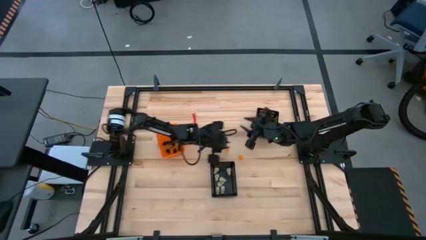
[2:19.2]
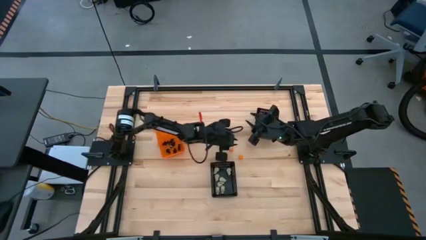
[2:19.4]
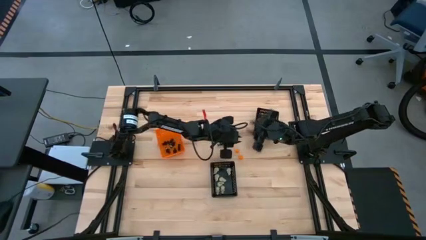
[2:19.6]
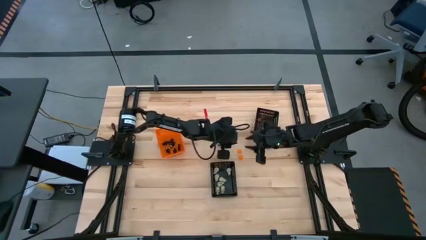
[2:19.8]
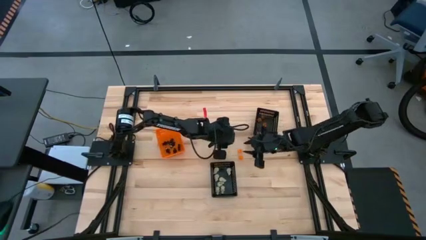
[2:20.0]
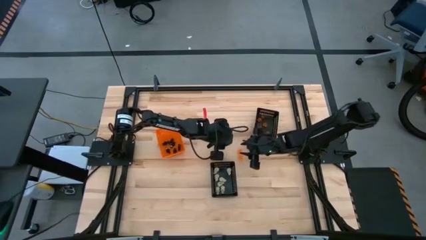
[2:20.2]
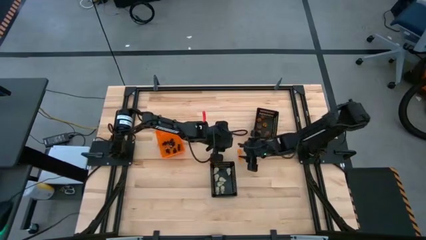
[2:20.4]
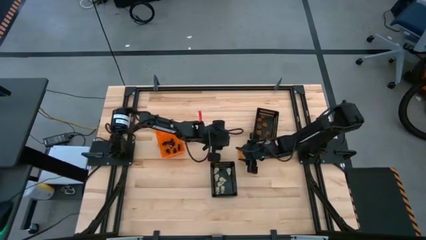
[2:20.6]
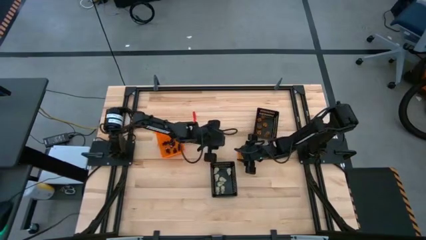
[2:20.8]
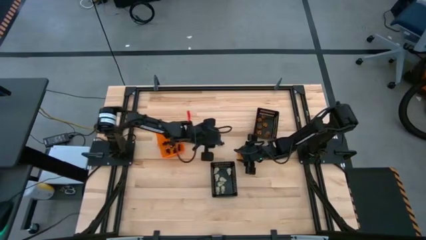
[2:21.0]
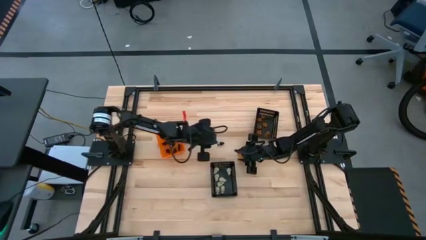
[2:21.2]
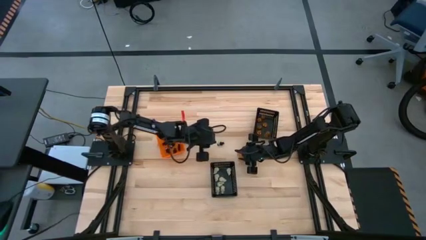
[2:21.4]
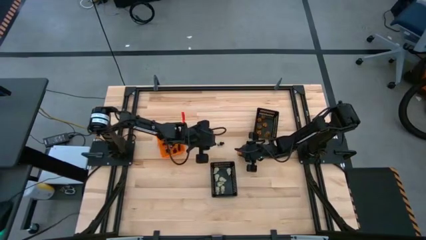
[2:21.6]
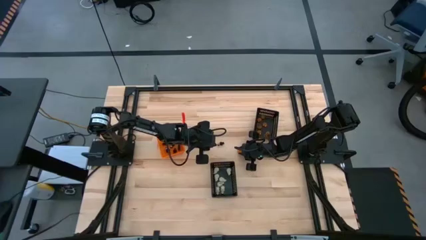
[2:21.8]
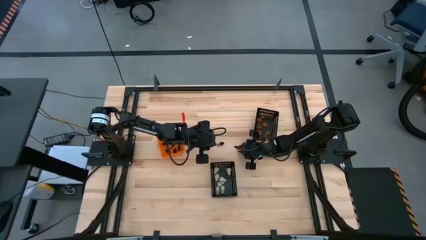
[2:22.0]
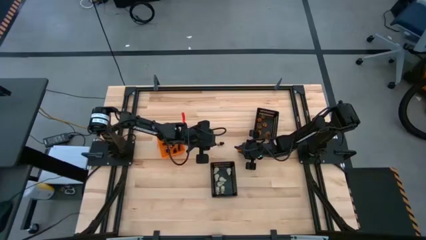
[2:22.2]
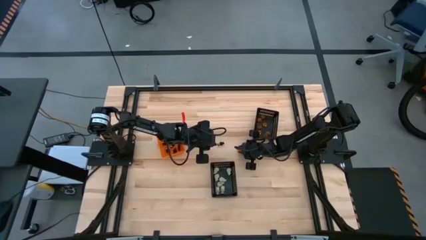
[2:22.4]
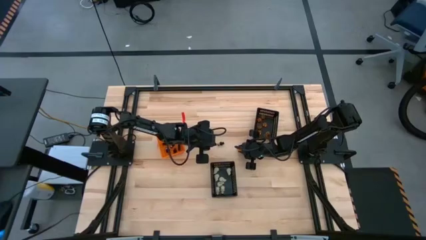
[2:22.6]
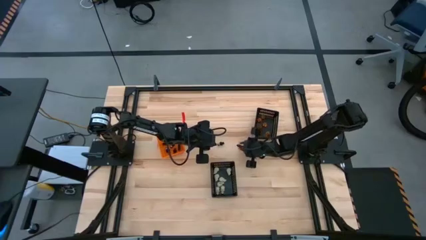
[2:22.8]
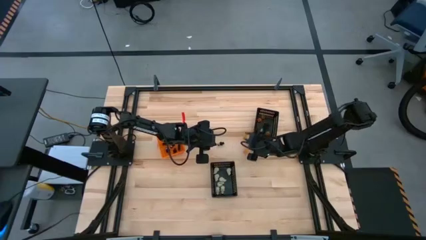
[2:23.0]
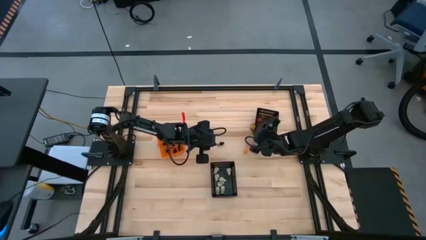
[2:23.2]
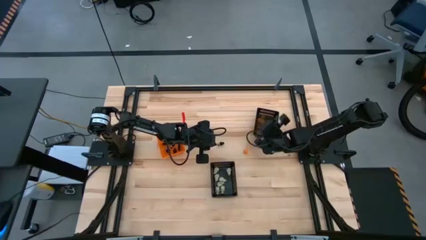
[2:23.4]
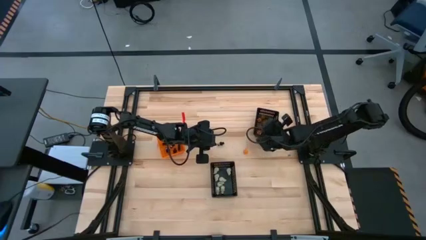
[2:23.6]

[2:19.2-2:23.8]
Task: Sort Halloween decoration
Put the orange pumpkin toy into the top black bin

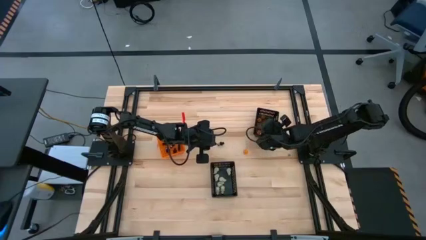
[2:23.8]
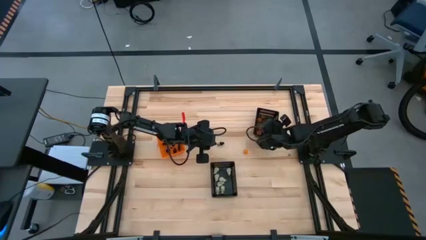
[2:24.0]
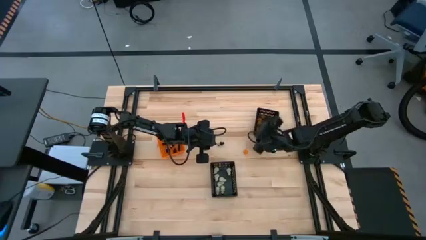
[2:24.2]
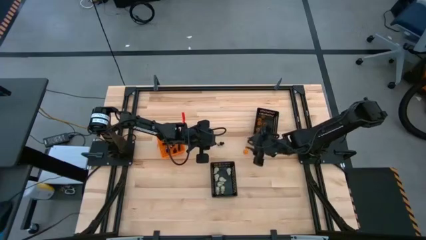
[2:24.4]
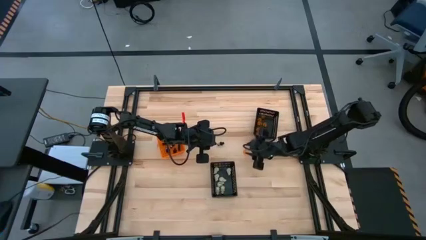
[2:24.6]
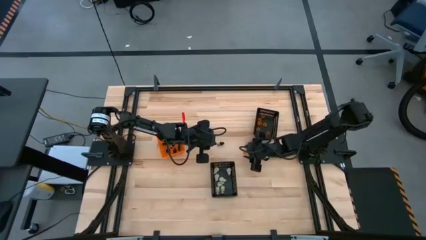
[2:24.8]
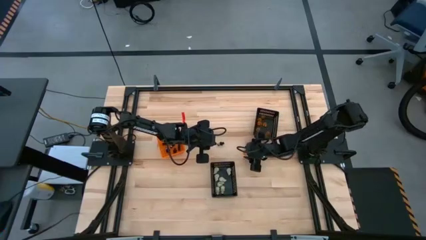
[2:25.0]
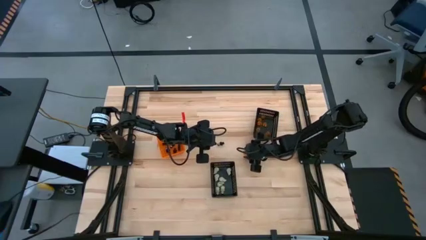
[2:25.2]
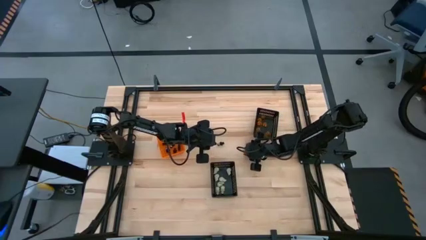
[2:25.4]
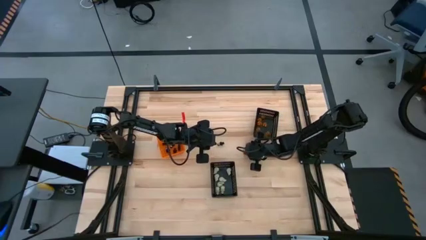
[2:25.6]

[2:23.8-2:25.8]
Put the orange pumpkin toy into the top black bin

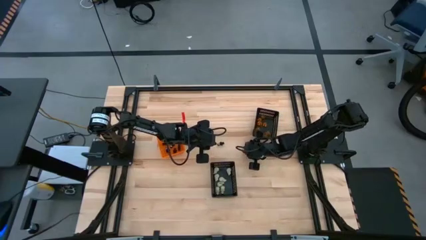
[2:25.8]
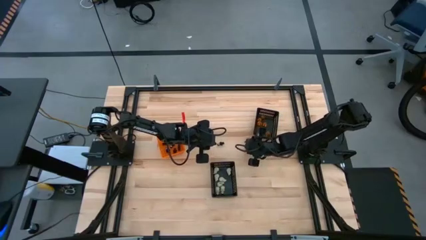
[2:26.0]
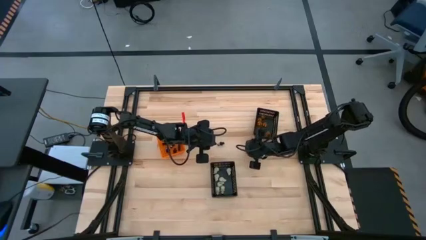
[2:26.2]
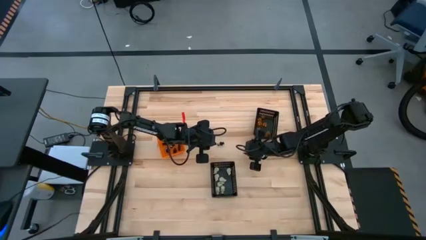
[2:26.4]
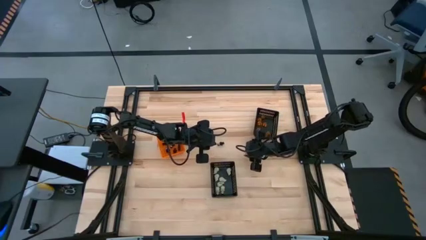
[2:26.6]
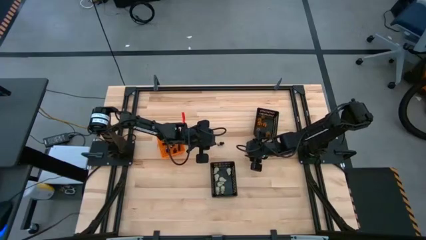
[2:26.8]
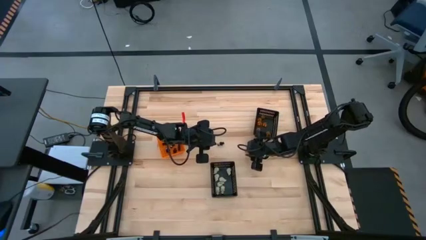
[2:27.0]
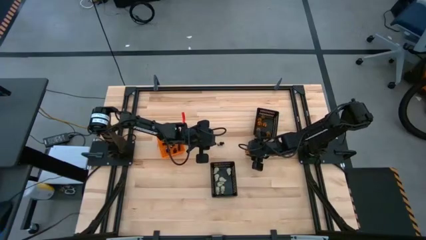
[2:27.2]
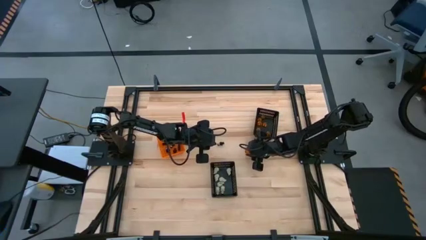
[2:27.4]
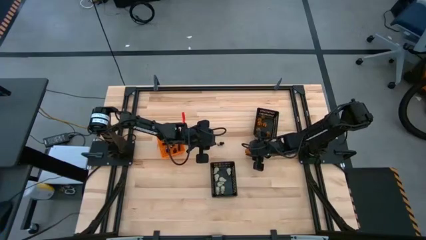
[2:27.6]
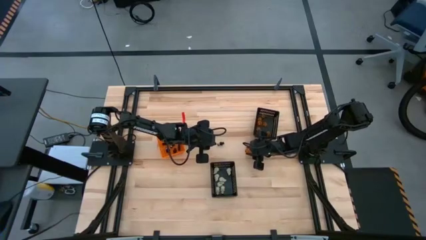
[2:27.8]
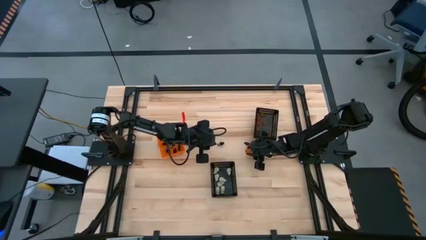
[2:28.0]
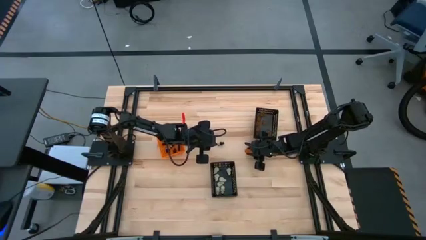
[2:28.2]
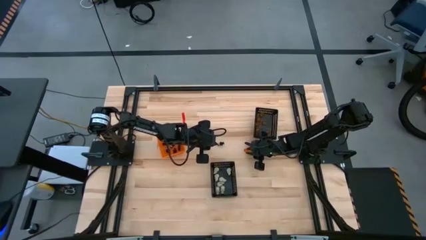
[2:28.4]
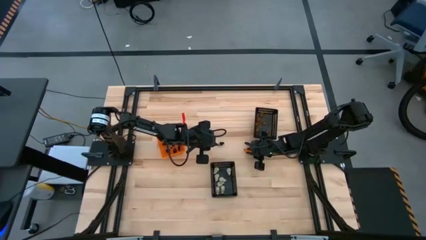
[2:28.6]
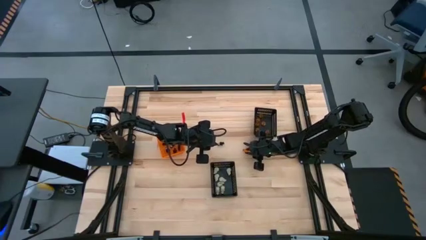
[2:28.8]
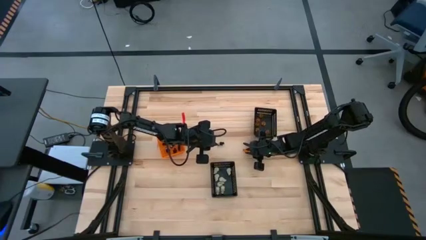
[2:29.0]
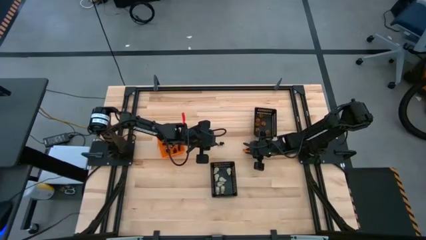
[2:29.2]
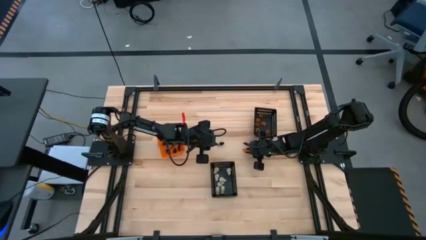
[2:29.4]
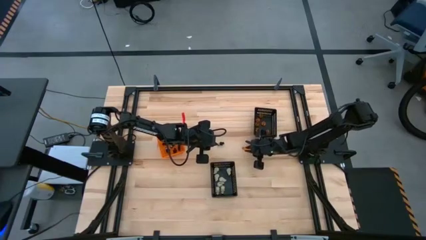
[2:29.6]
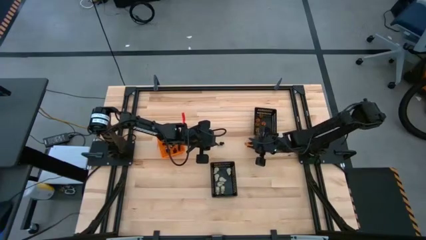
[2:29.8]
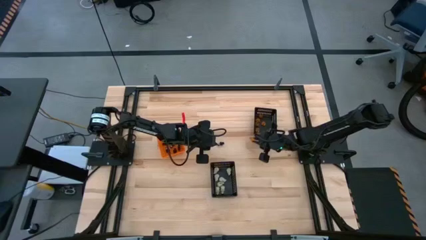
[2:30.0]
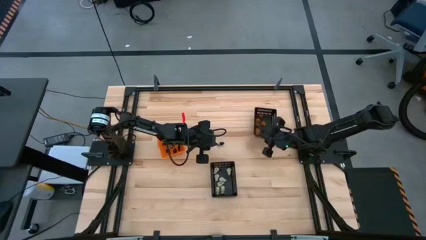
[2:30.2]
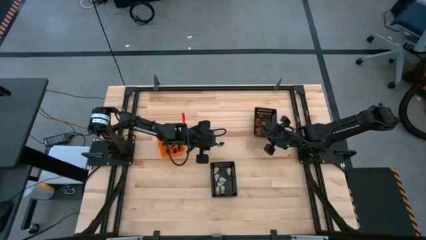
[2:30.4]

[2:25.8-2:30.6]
Put the orange pumpkin toy into the top black bin

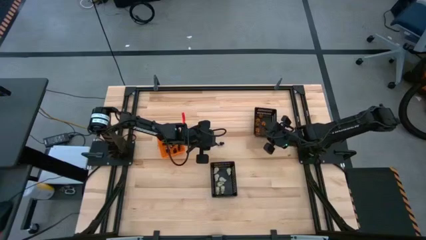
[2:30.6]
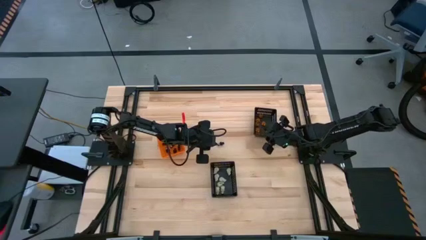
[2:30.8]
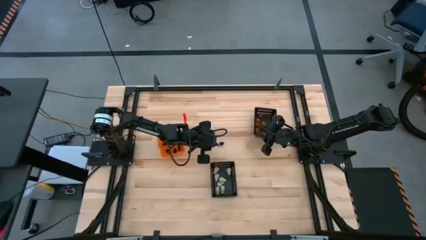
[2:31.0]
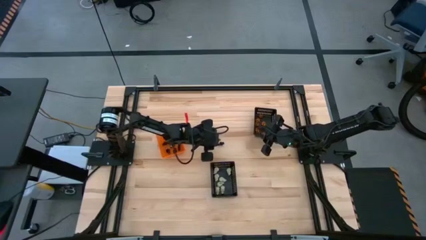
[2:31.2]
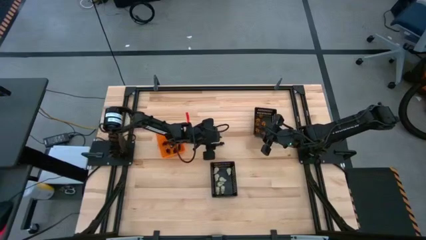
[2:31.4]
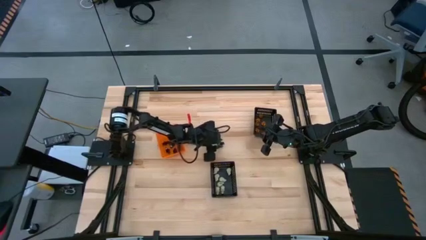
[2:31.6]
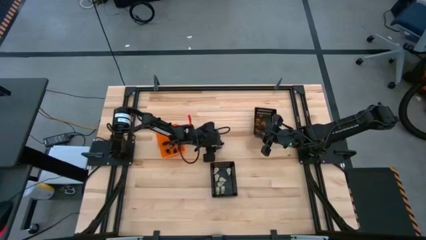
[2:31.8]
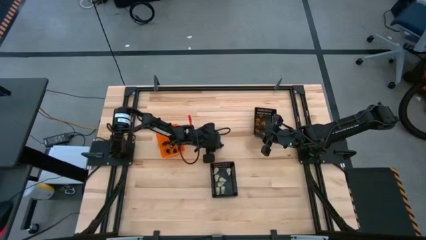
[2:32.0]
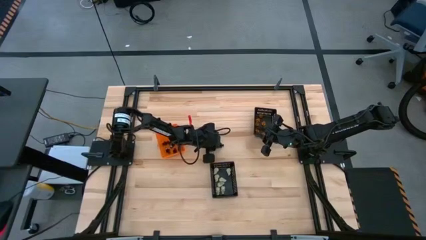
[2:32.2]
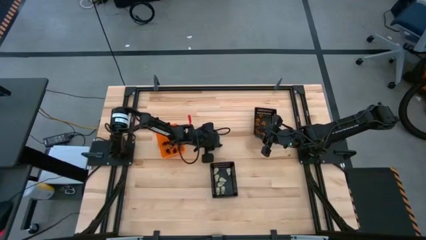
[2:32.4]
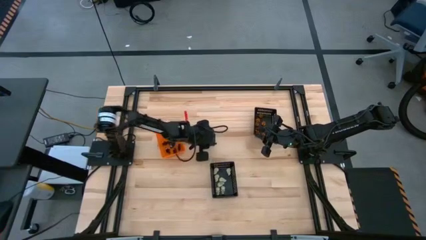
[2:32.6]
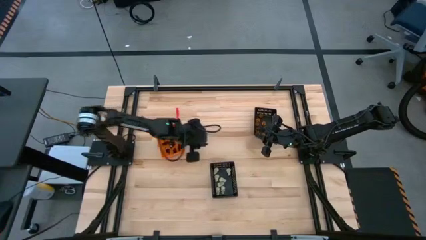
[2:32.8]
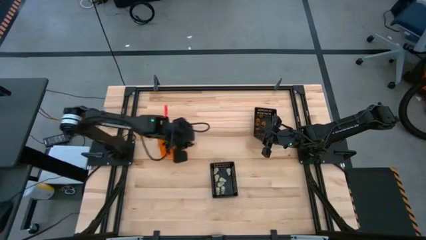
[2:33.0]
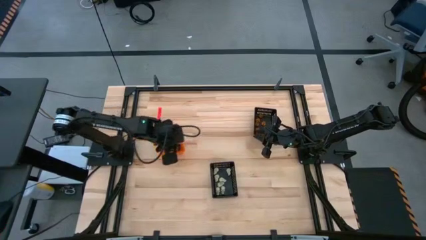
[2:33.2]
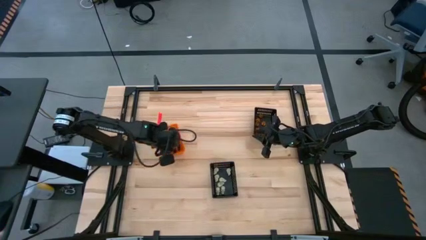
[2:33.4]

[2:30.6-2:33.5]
Put the black skeleton toy into the orange bin
